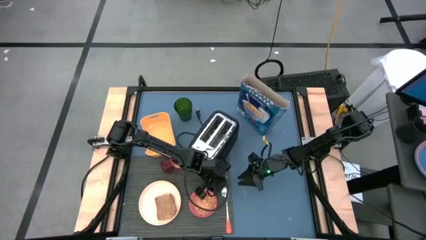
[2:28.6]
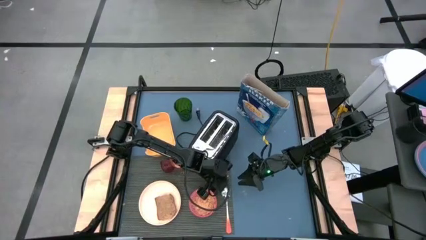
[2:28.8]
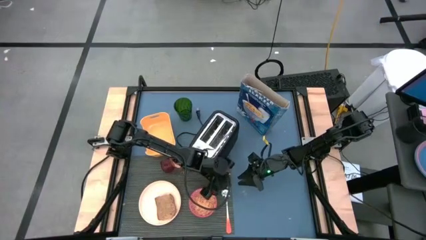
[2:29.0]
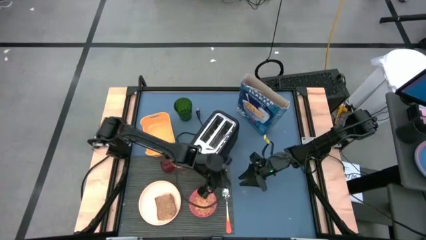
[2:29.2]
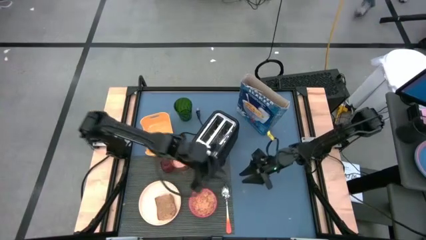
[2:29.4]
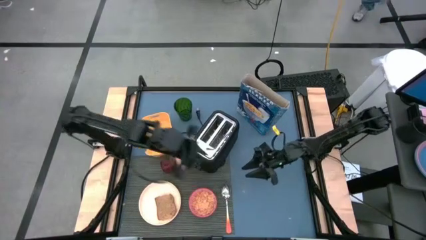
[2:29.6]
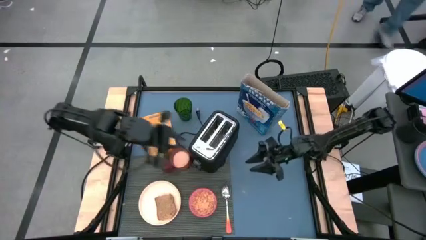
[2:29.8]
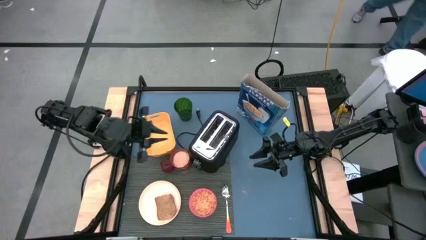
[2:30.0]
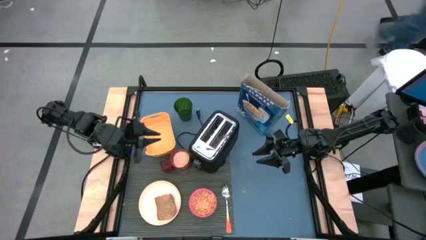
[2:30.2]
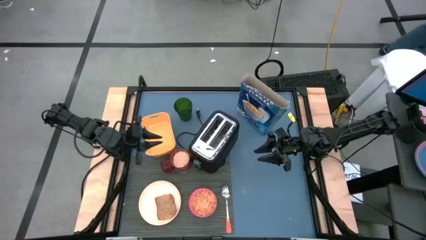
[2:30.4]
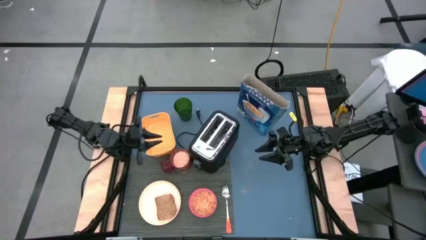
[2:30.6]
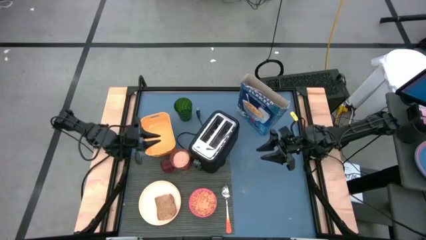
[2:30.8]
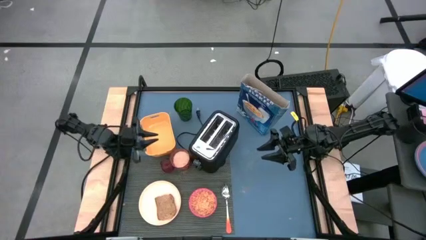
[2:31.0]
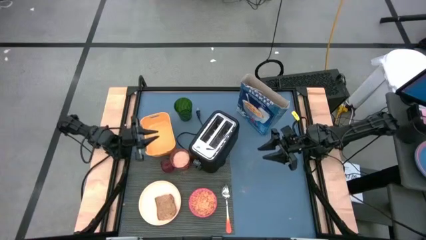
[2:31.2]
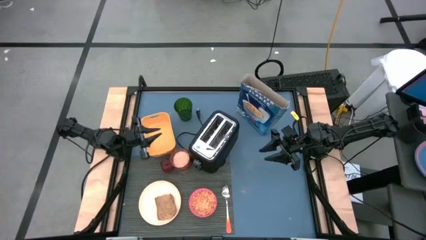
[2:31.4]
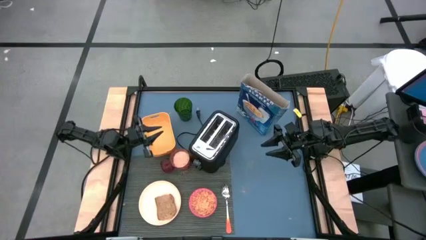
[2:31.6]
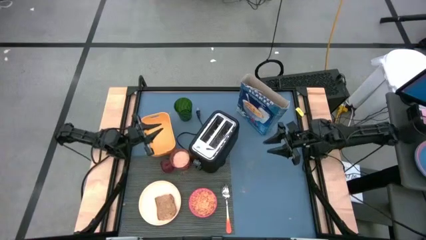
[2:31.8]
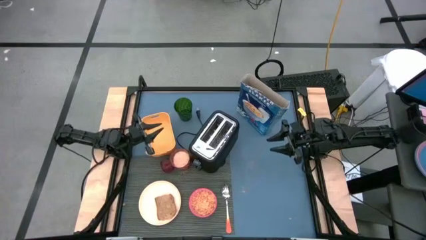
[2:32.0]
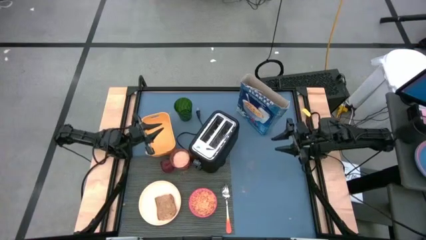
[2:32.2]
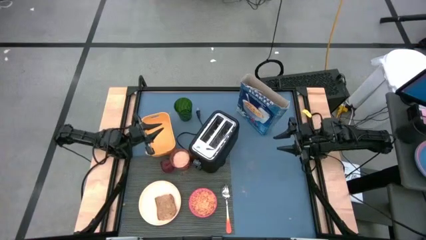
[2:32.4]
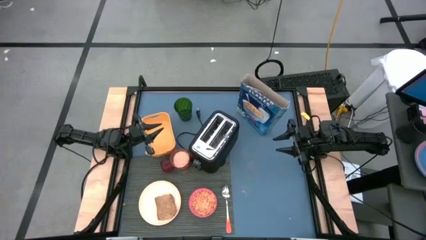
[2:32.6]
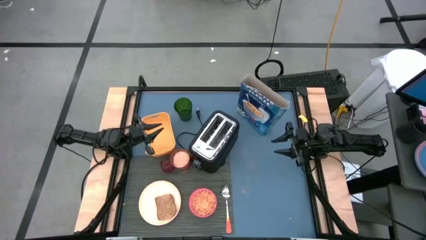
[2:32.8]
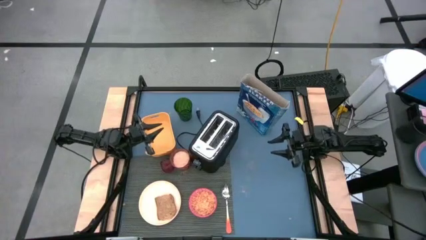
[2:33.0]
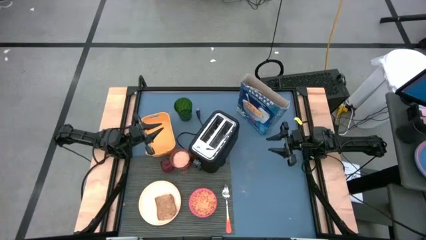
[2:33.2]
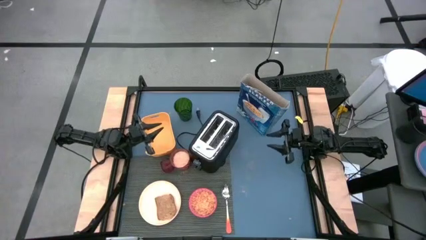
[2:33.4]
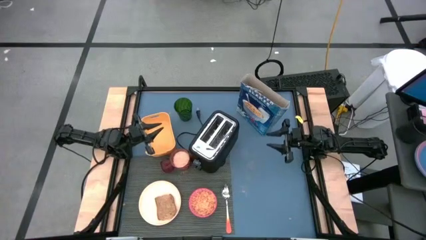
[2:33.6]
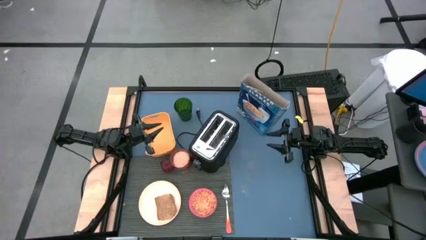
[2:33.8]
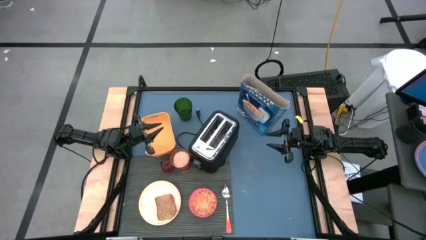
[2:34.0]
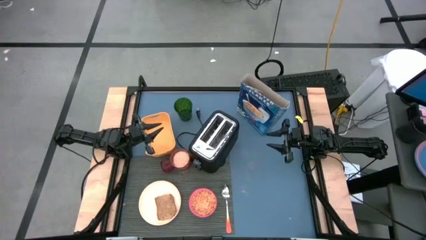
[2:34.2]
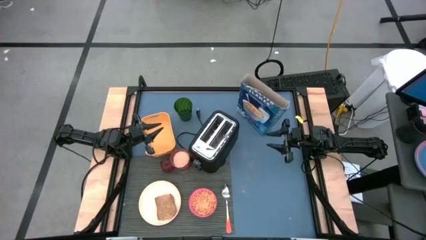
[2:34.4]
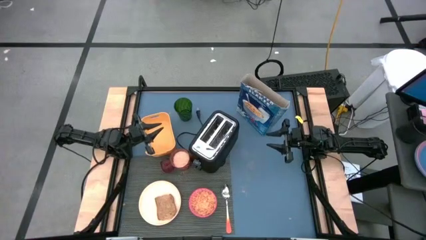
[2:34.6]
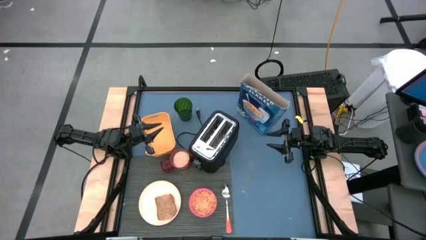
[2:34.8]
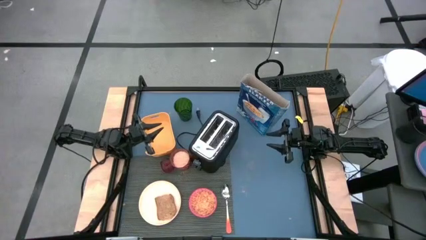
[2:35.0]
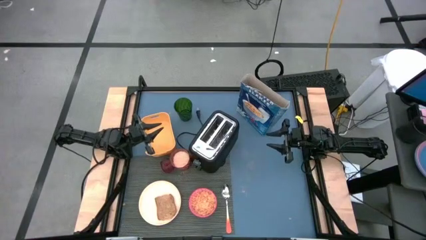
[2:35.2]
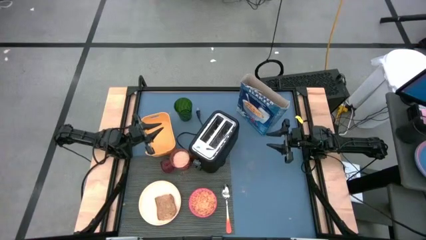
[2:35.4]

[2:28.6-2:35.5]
Task: Arrange a breakfast setting
Return to Home Position

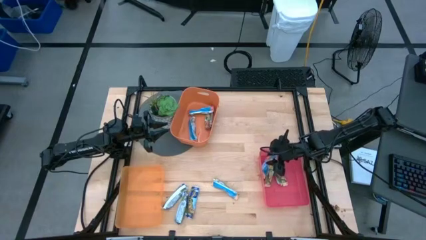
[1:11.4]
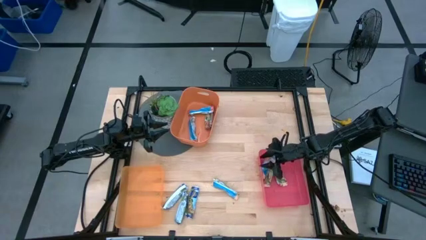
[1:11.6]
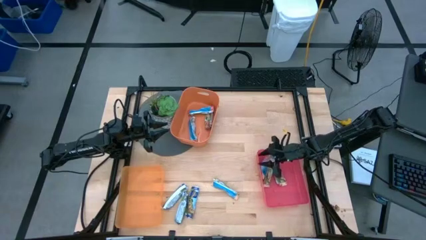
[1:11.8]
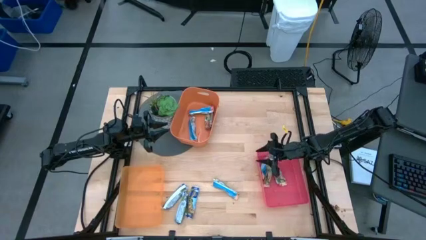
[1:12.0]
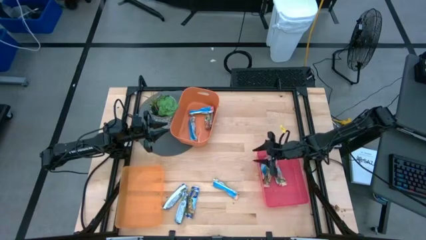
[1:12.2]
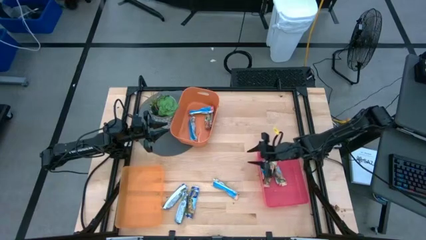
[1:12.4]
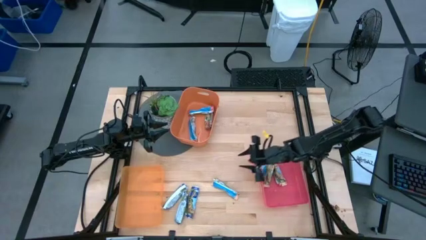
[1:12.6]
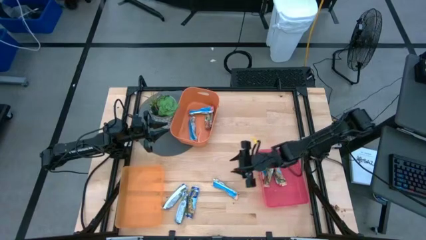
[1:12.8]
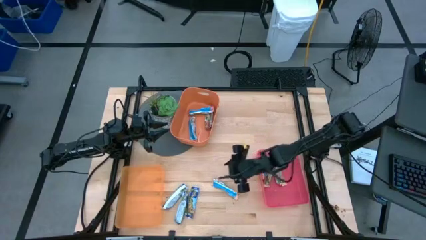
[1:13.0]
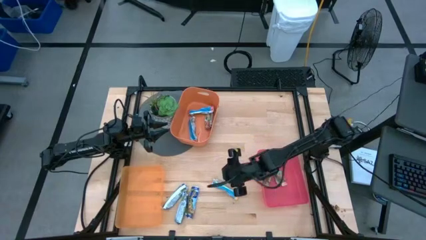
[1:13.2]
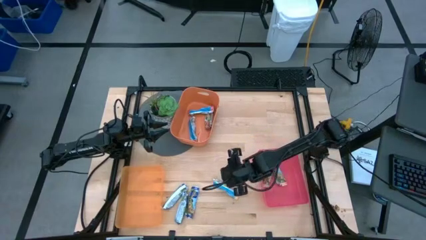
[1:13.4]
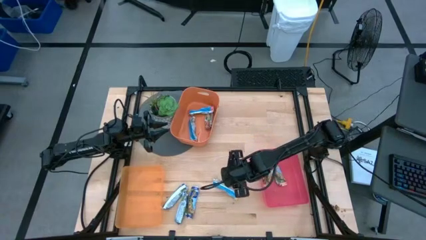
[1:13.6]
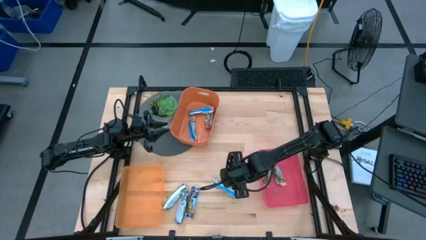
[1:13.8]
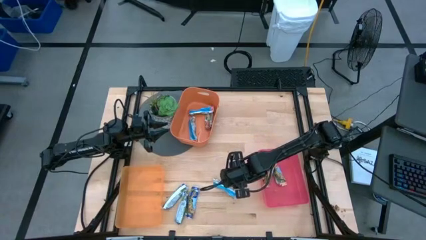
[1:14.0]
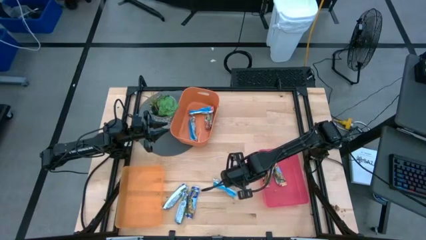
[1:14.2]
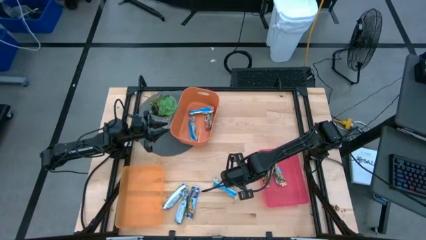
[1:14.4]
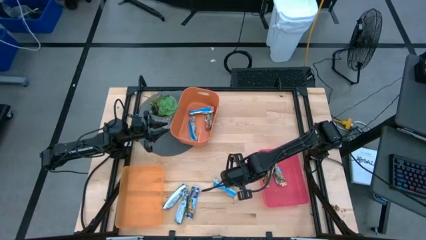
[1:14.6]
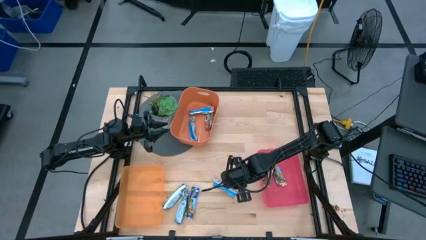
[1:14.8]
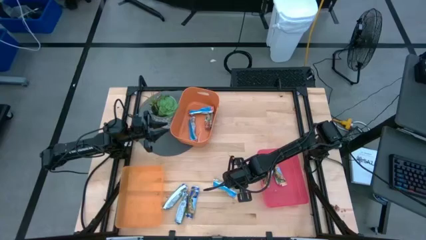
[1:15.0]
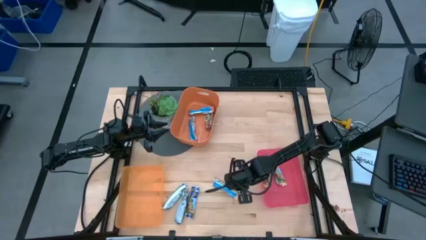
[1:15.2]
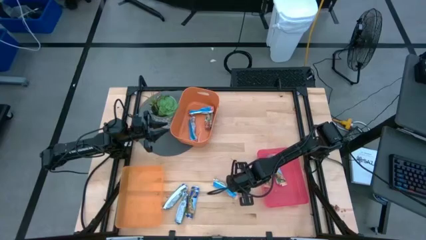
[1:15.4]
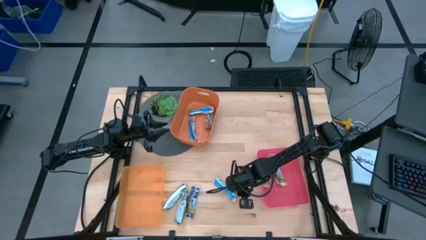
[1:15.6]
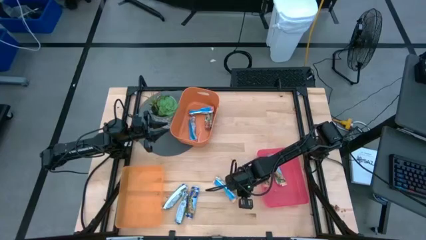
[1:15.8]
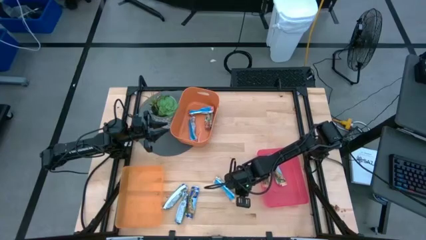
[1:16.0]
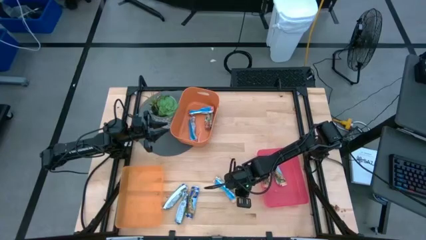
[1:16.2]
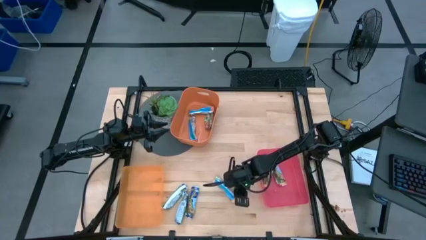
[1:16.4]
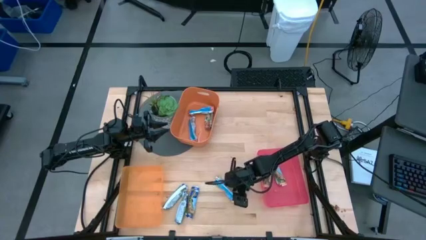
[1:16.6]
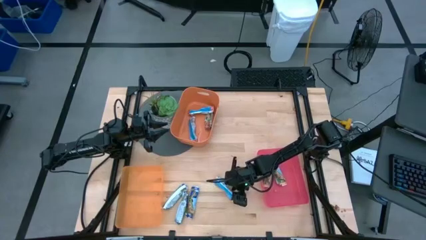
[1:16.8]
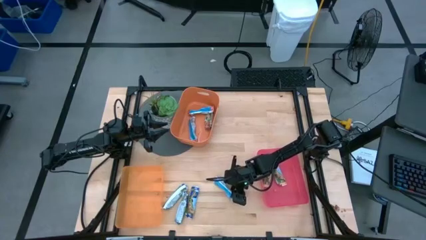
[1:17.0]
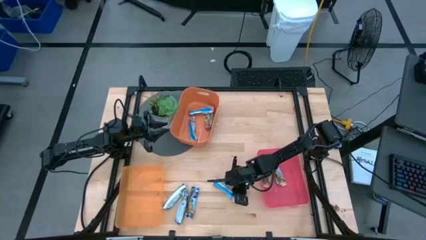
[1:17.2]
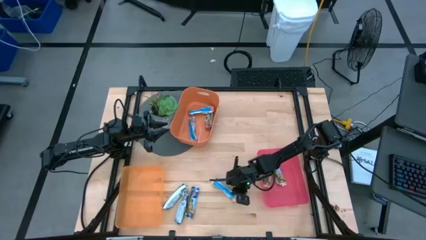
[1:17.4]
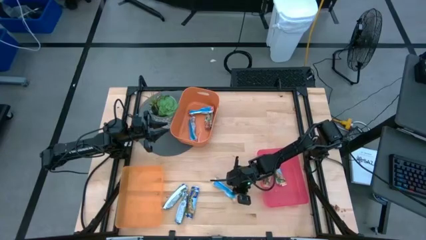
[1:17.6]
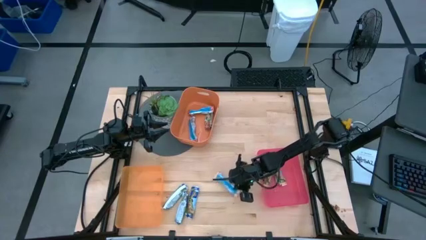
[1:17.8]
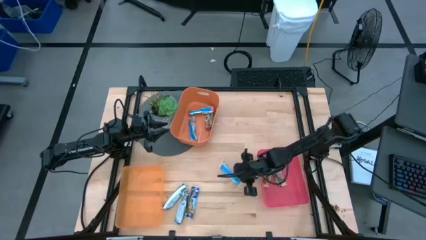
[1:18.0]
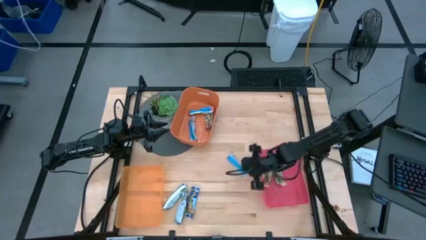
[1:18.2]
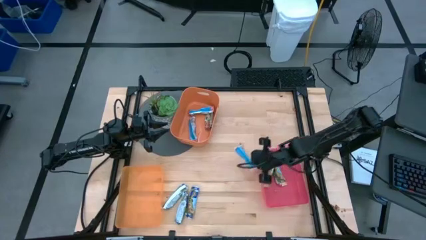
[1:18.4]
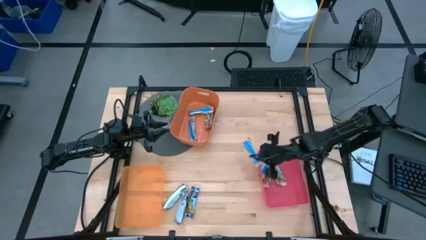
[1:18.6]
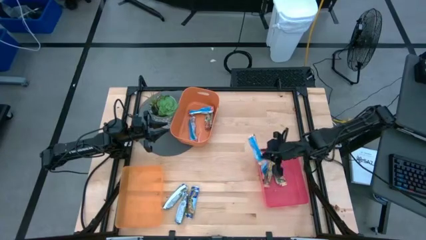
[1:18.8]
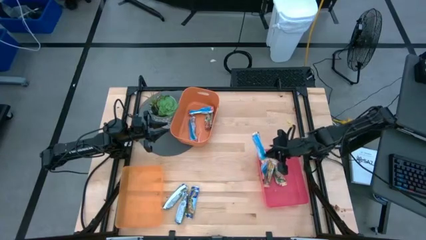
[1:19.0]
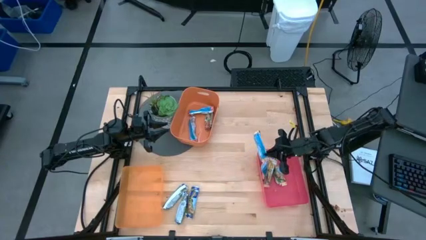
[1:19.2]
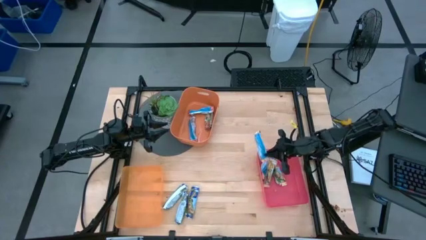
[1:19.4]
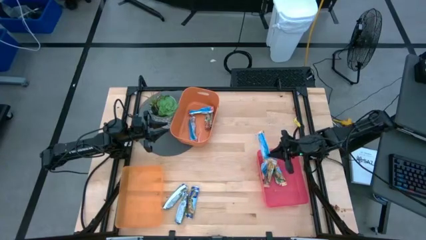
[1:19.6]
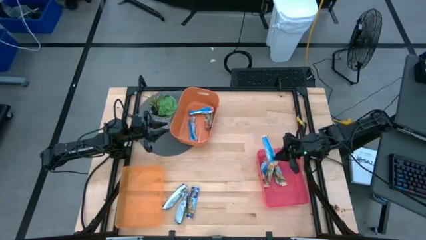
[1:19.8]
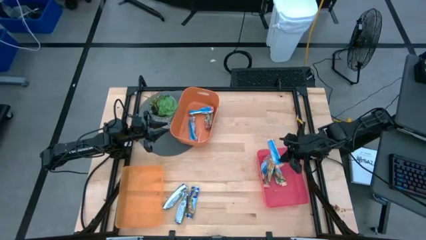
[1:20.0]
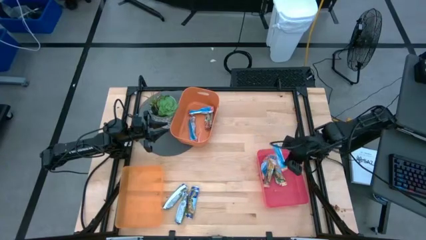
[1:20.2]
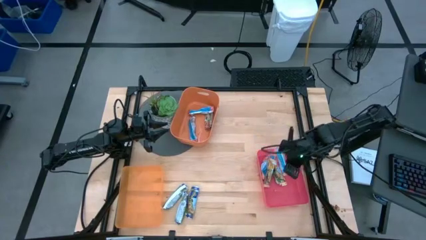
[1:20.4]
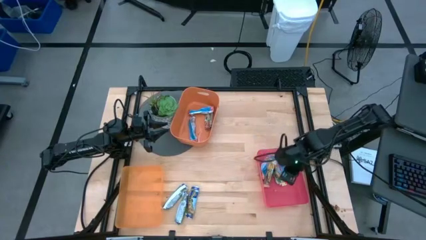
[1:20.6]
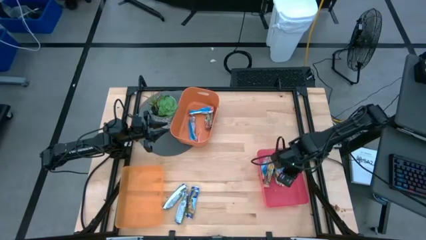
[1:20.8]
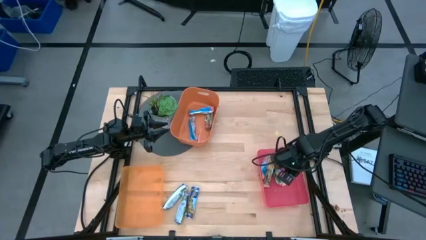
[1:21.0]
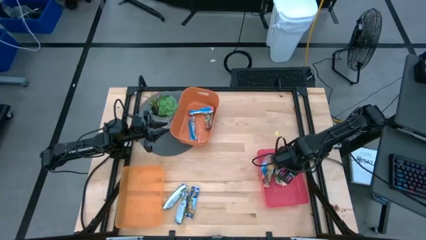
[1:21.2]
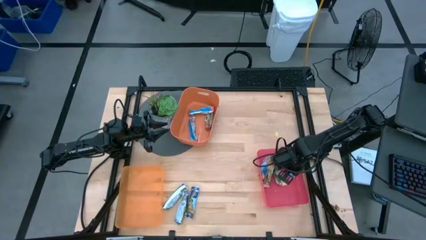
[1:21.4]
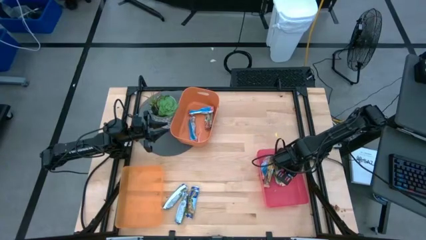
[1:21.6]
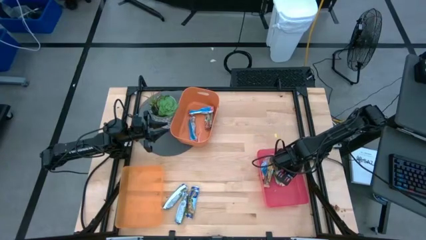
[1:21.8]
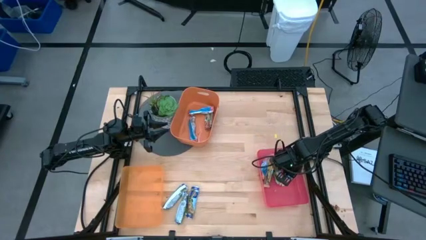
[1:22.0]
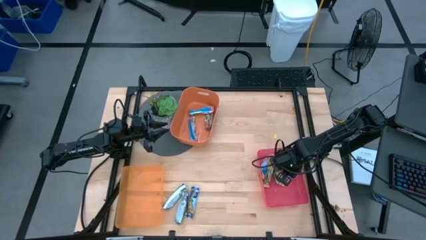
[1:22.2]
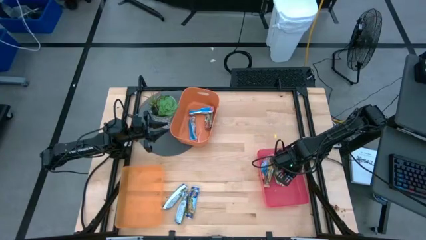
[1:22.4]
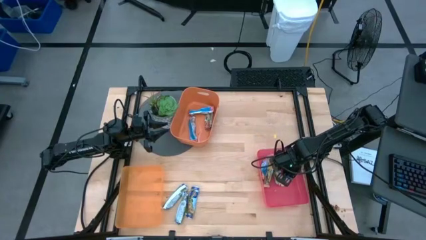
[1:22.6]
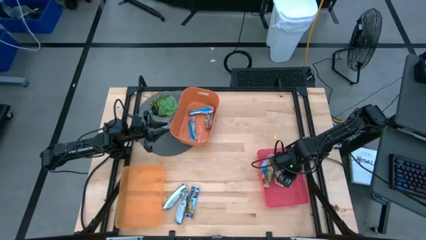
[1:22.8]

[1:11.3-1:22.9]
Task: Pick and place Granola Bars by type
Put the yellow granola bar into the red bin
